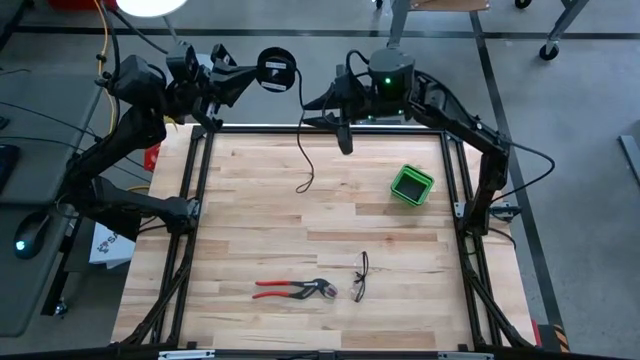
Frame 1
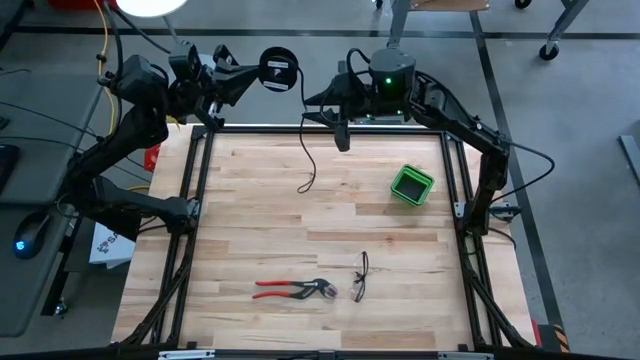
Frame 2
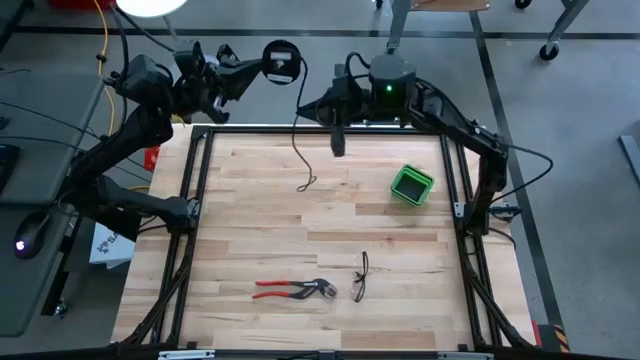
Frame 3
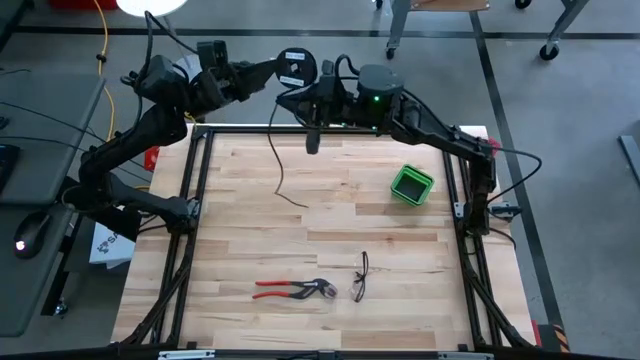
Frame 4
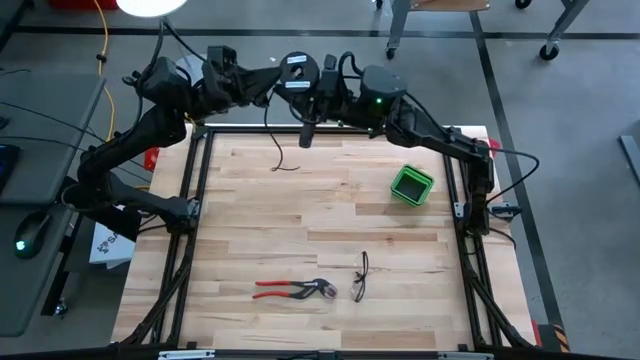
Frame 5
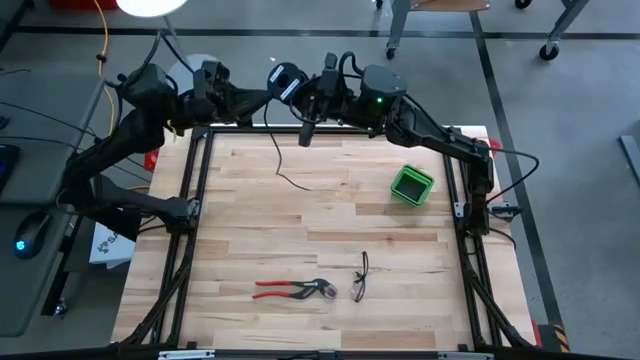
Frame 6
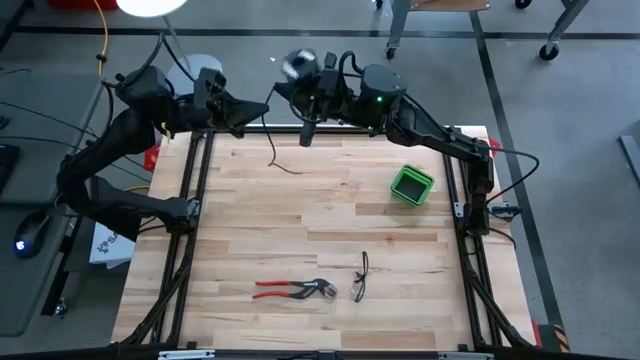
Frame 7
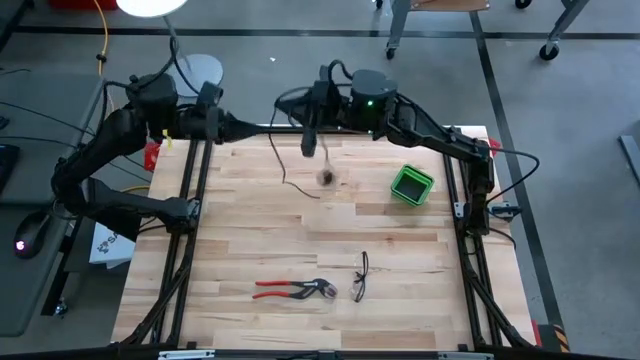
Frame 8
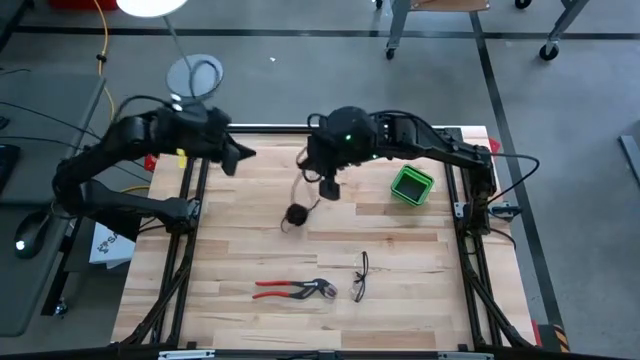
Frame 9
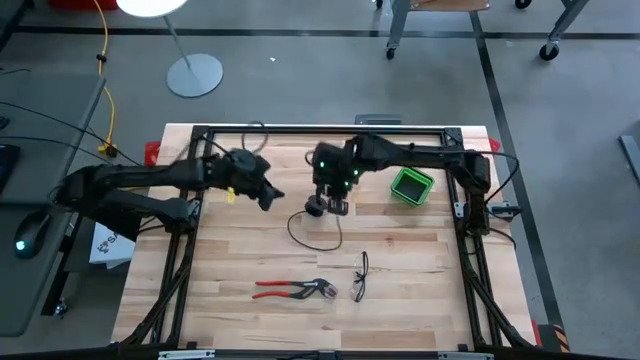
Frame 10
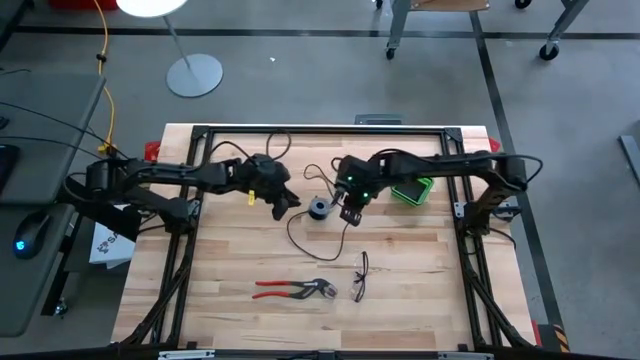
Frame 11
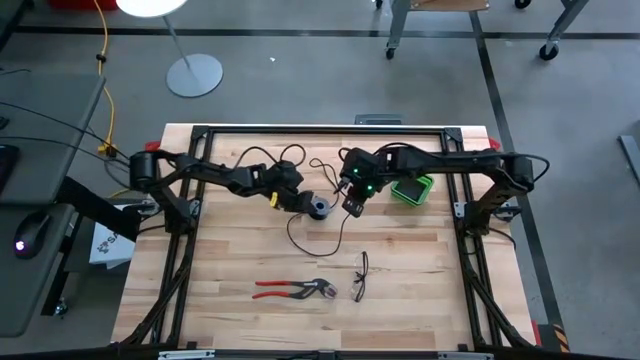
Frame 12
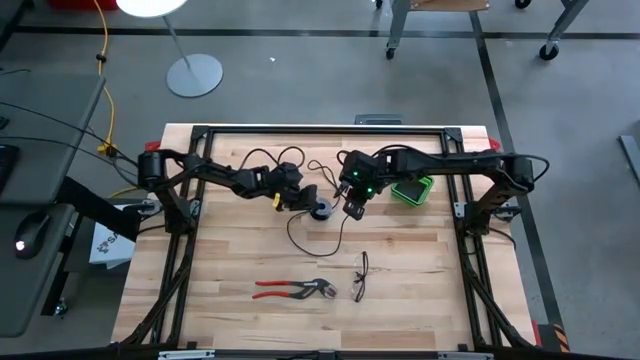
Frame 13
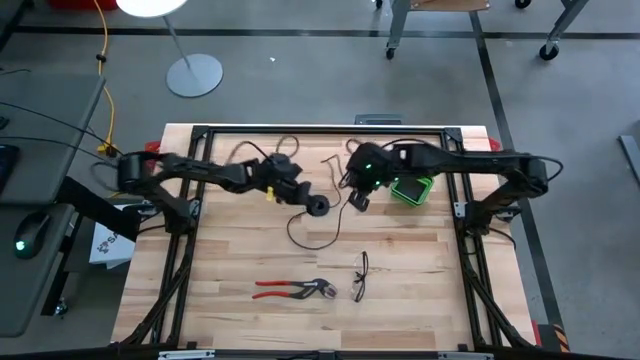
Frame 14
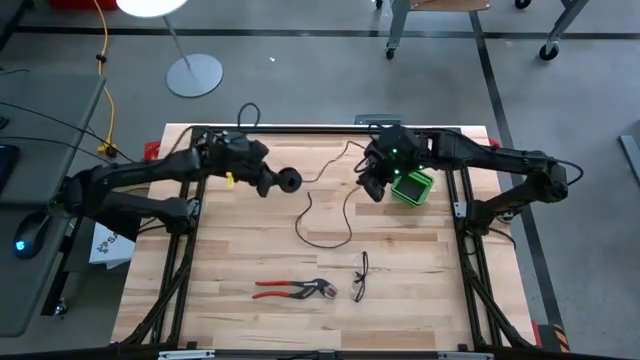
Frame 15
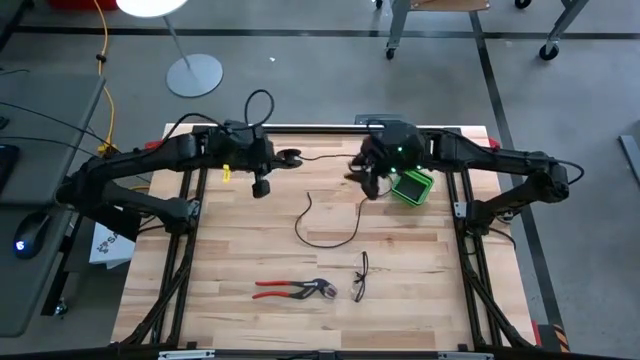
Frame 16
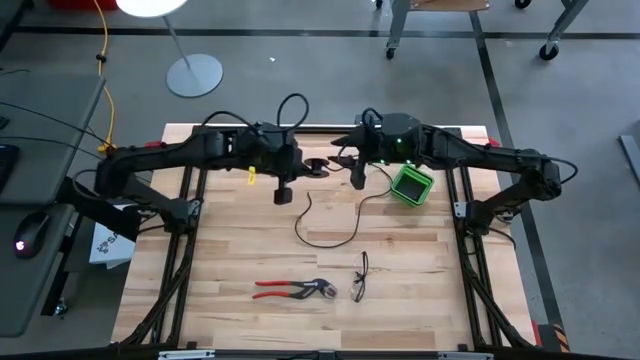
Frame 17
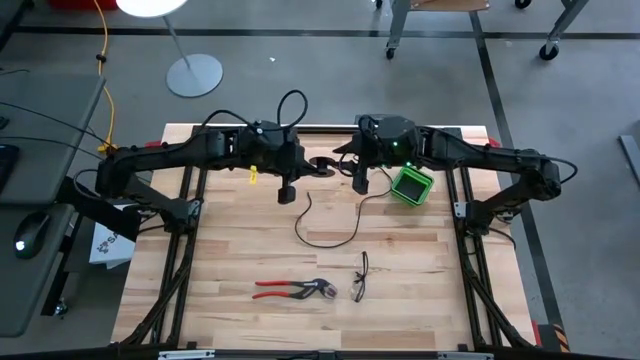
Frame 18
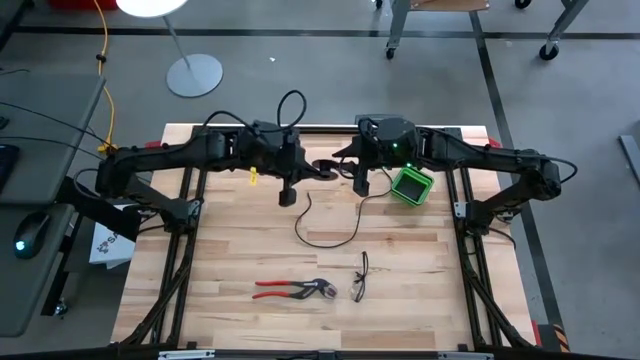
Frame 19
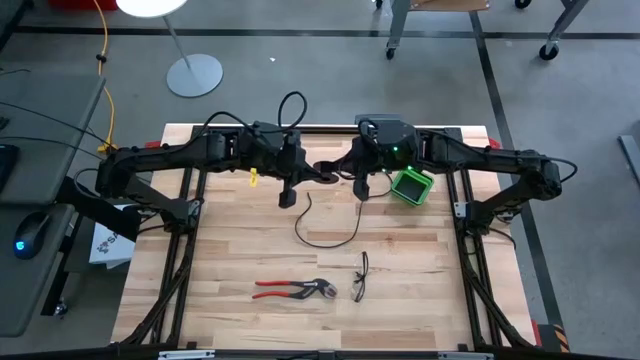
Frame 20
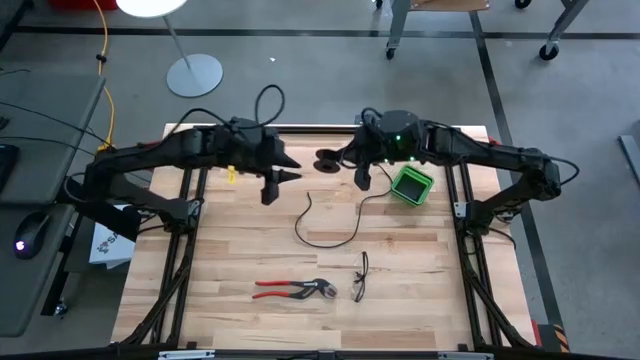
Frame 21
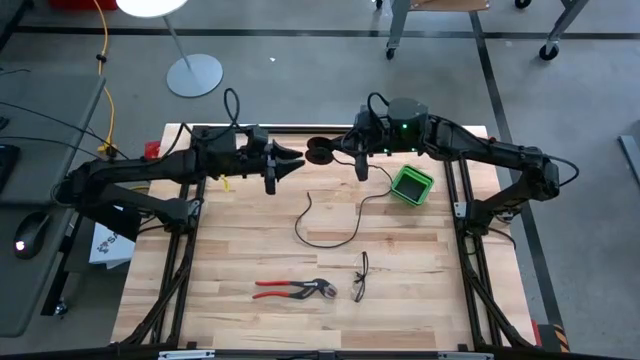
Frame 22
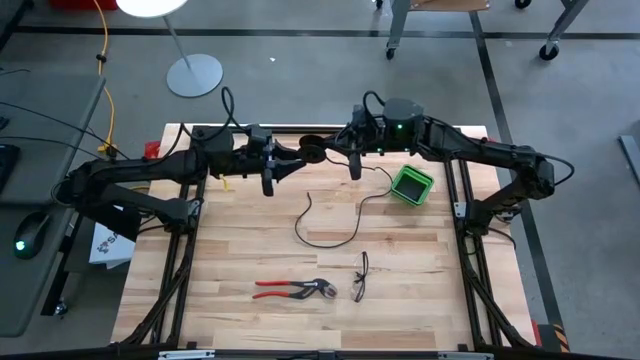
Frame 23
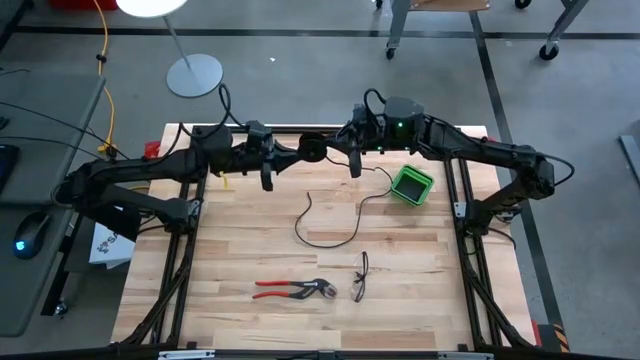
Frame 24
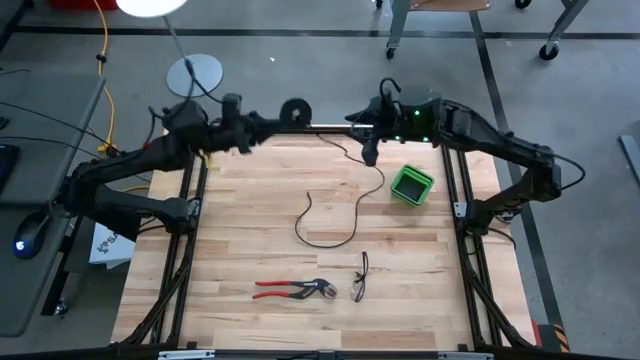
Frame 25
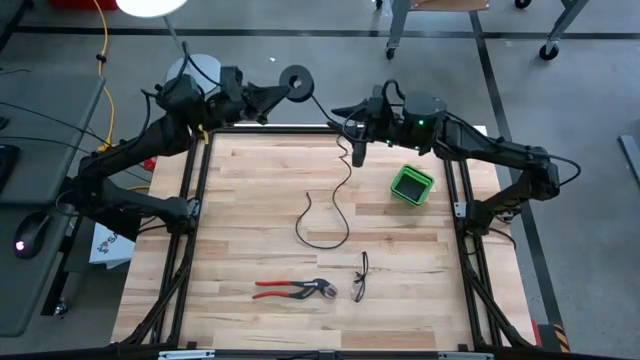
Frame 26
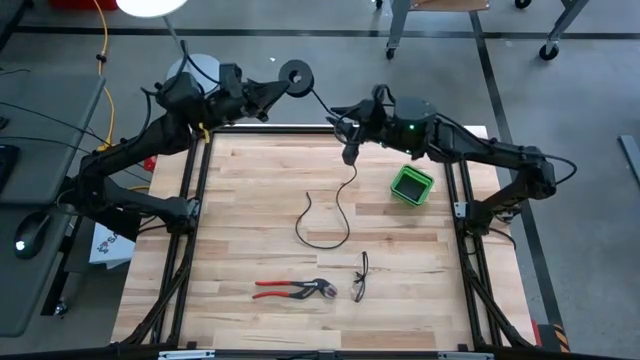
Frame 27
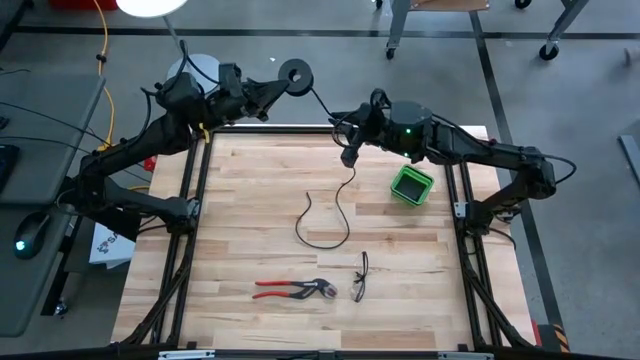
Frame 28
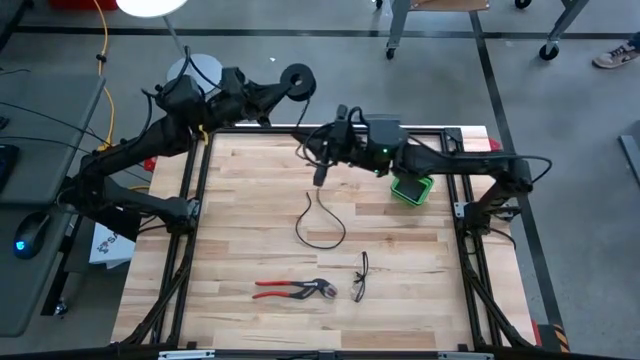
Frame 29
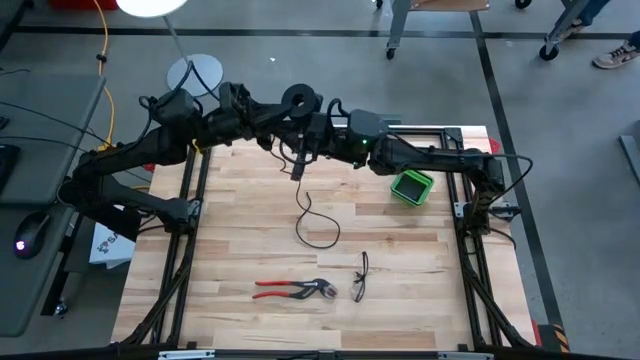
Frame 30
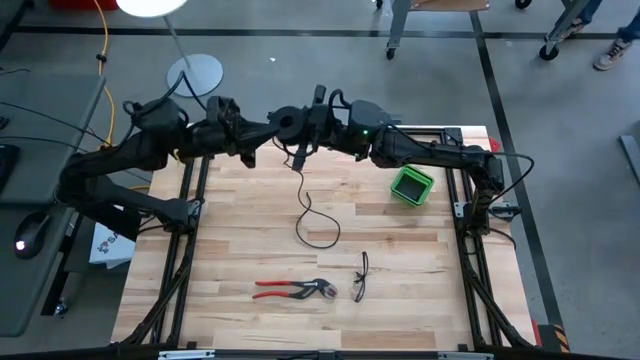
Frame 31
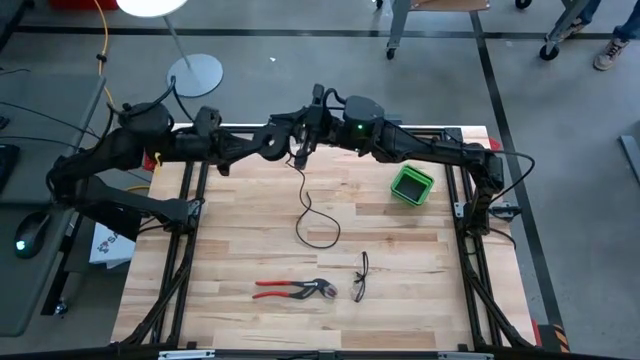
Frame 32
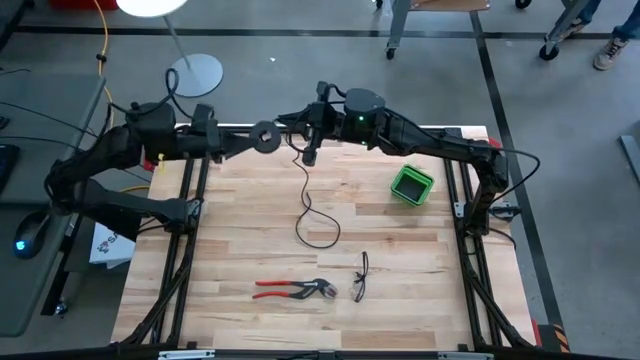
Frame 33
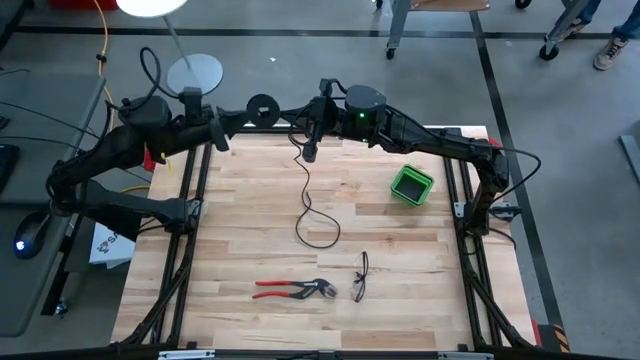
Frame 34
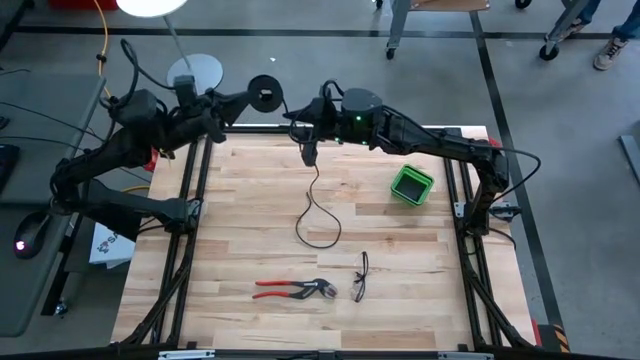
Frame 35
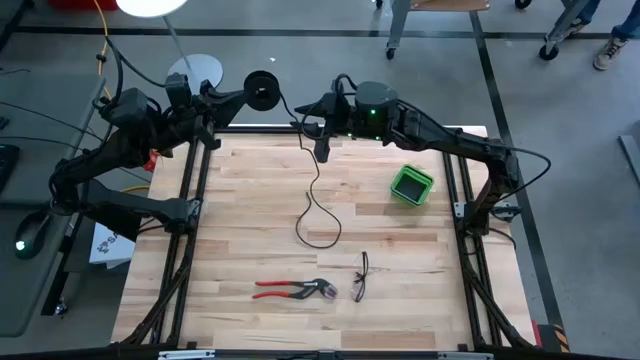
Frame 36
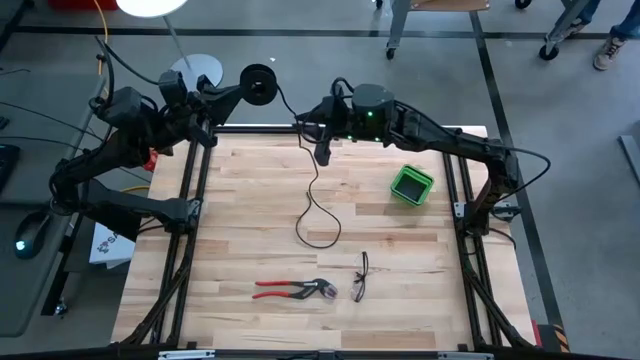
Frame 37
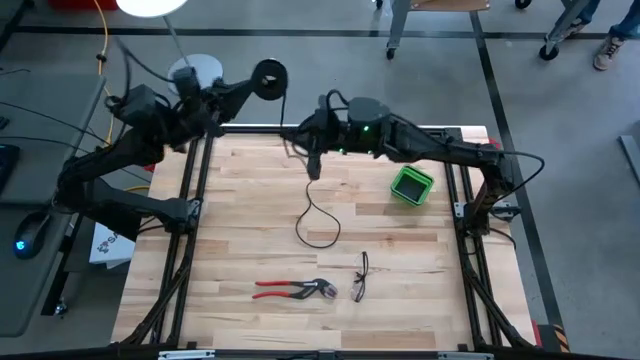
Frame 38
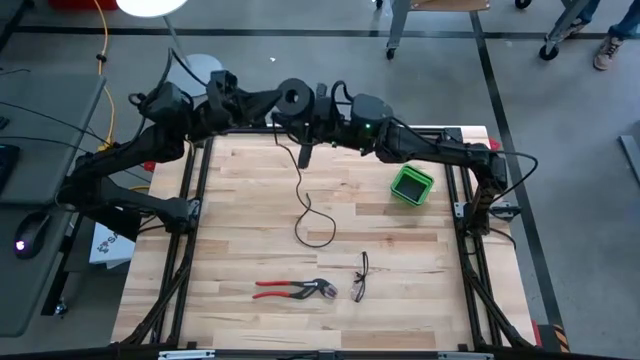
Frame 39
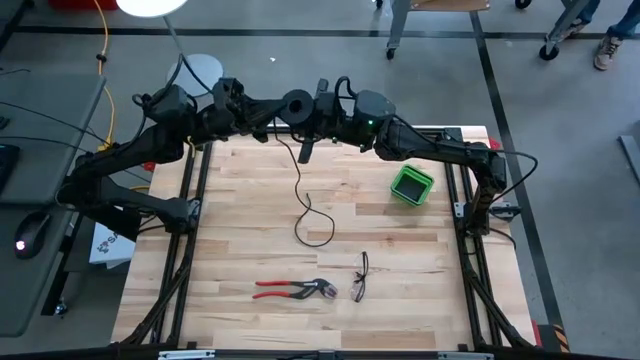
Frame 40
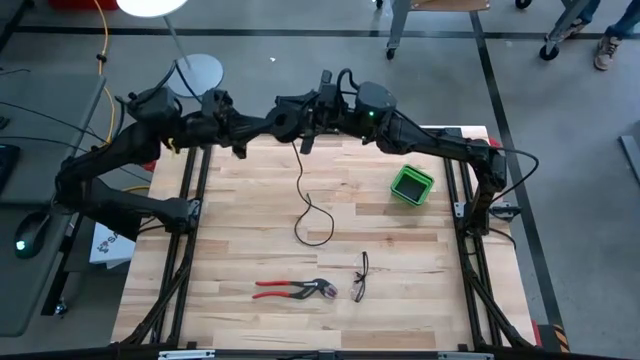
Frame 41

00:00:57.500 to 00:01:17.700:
Task: Coil cords
Coil the black wire onto the black spool
